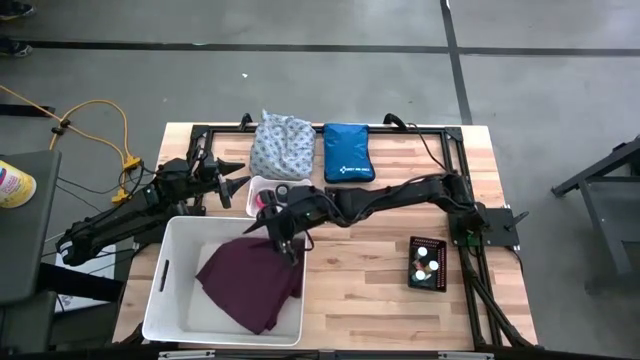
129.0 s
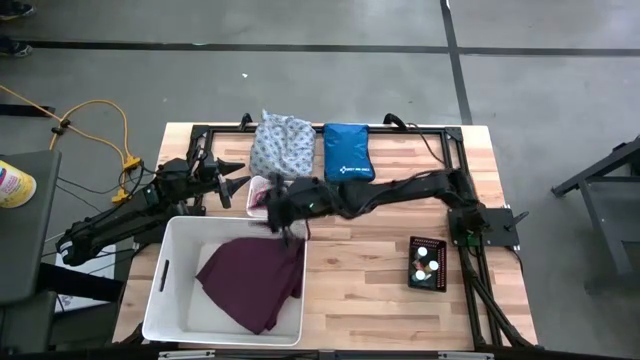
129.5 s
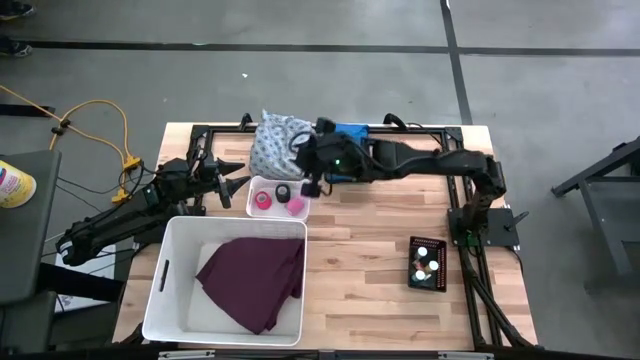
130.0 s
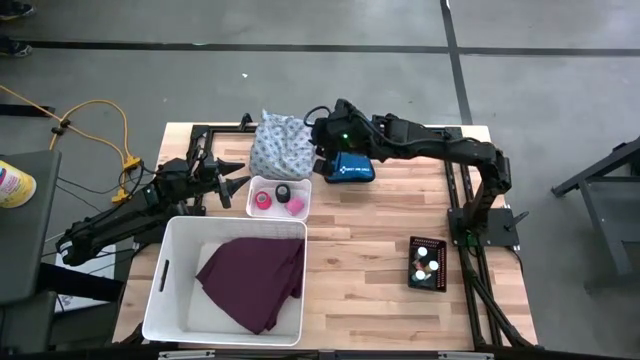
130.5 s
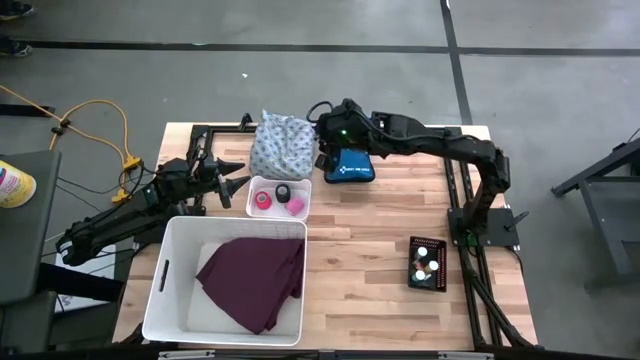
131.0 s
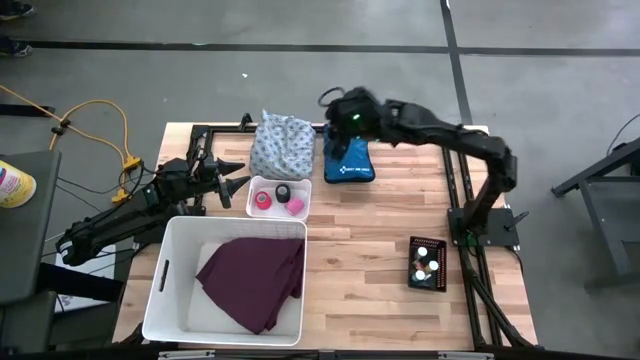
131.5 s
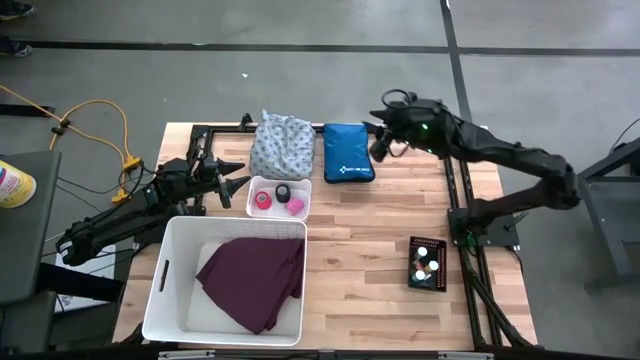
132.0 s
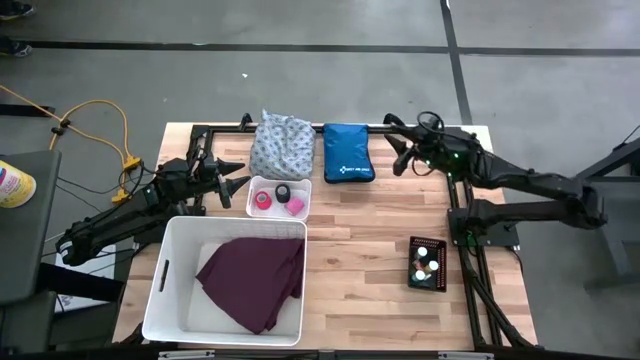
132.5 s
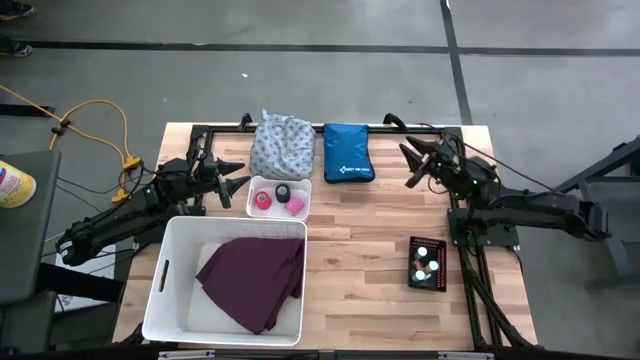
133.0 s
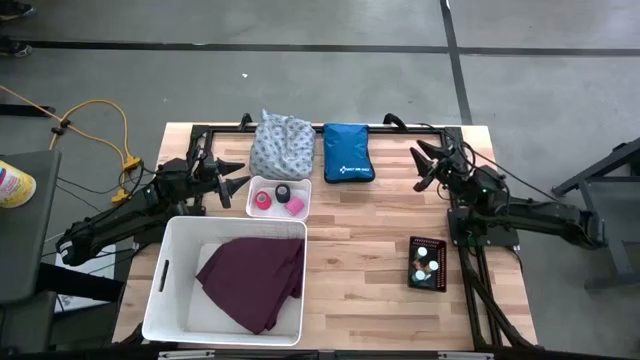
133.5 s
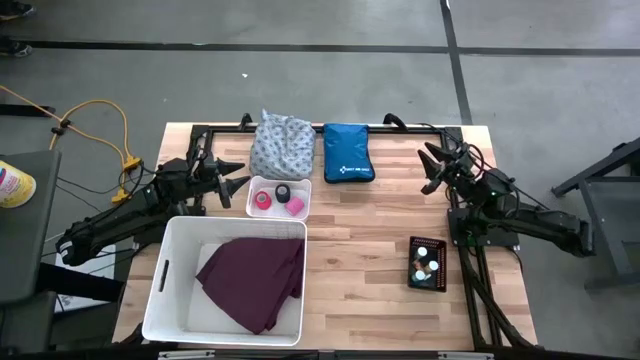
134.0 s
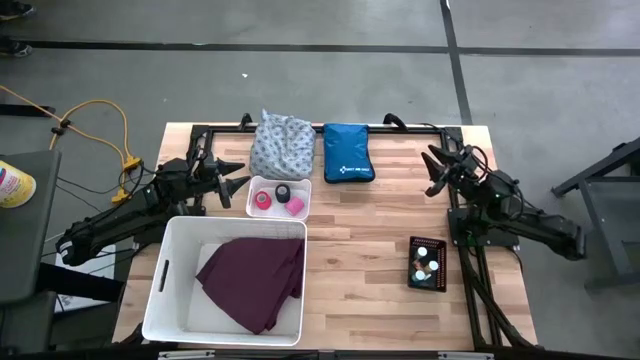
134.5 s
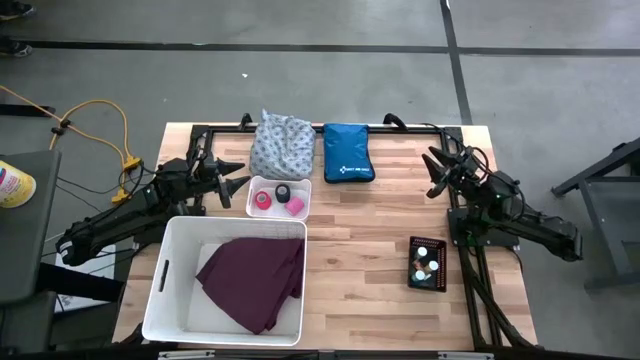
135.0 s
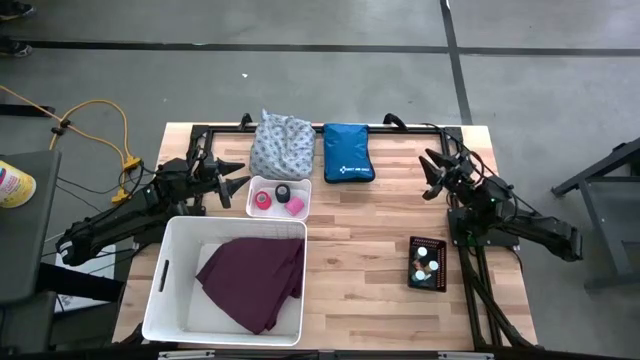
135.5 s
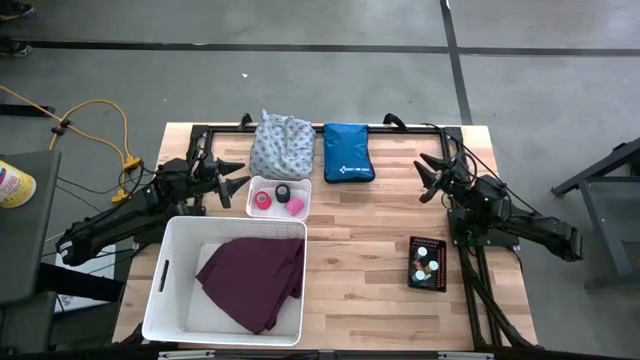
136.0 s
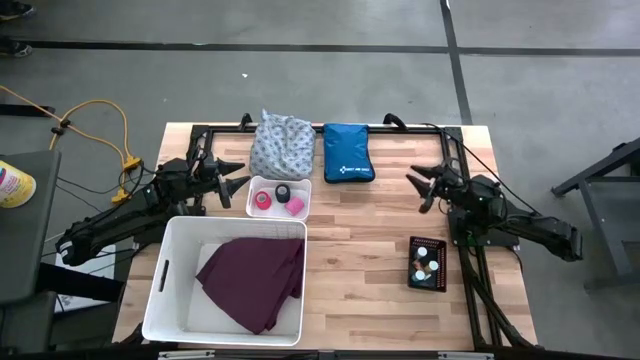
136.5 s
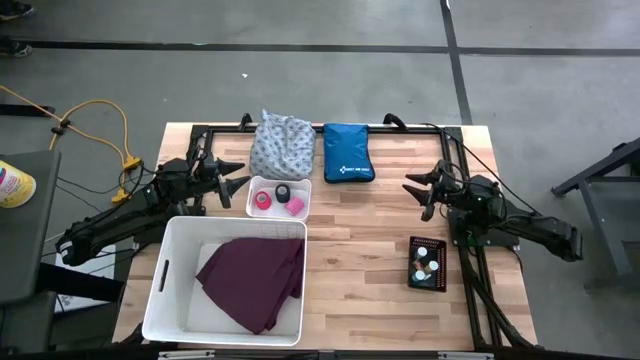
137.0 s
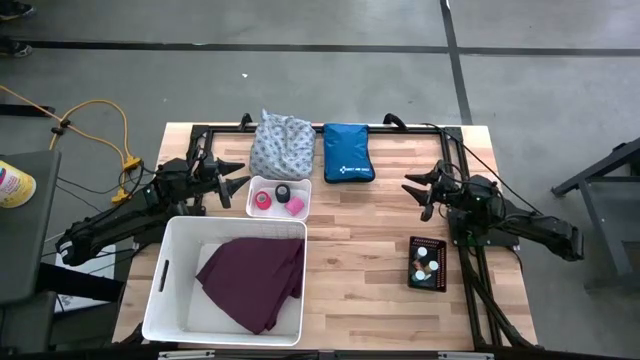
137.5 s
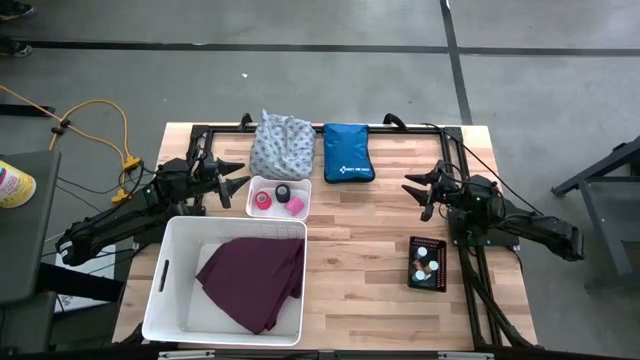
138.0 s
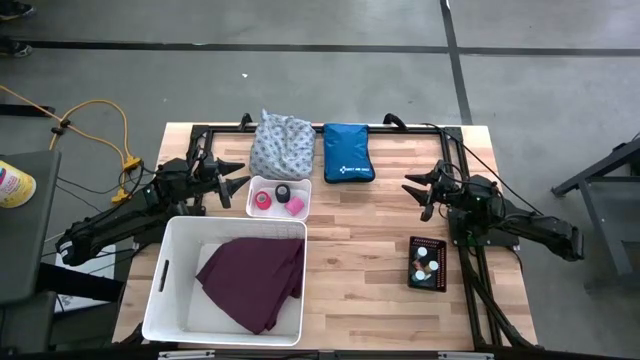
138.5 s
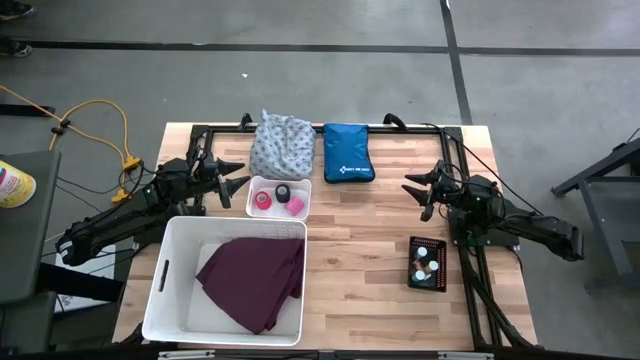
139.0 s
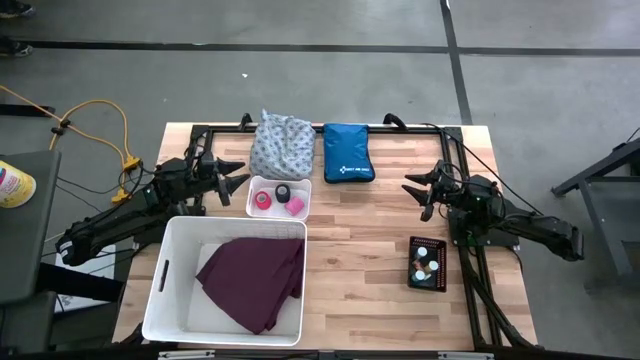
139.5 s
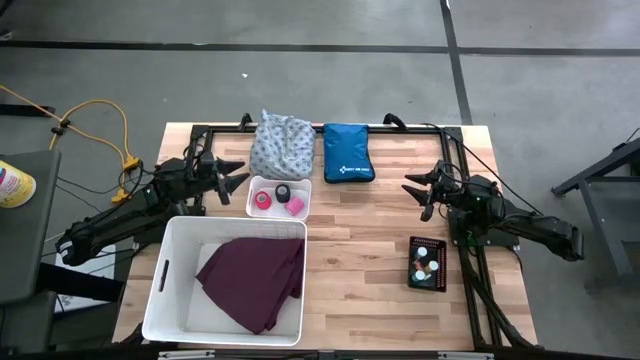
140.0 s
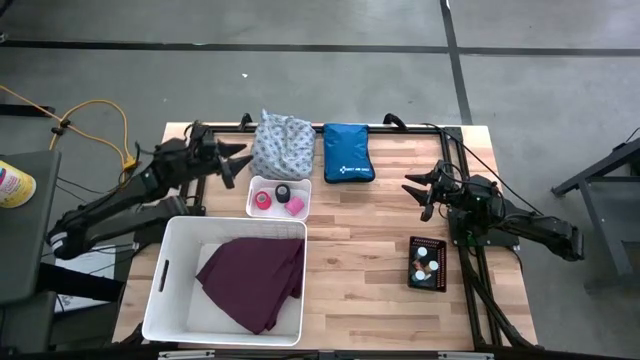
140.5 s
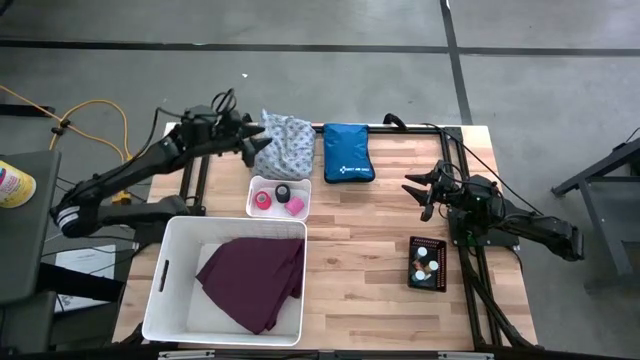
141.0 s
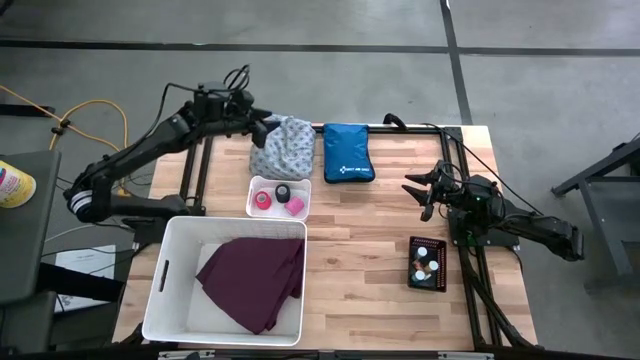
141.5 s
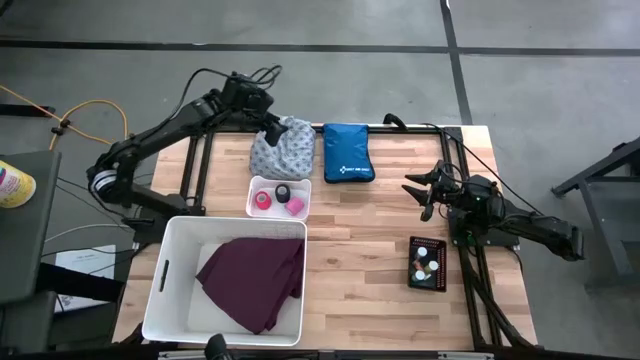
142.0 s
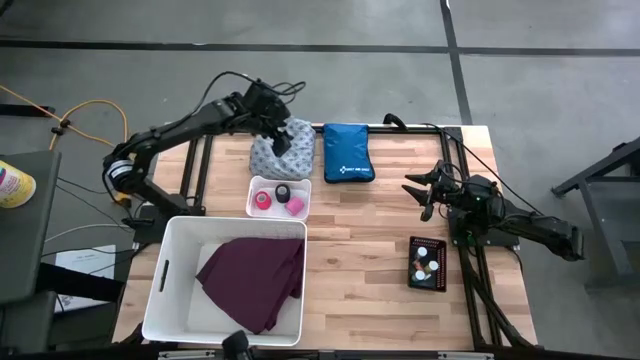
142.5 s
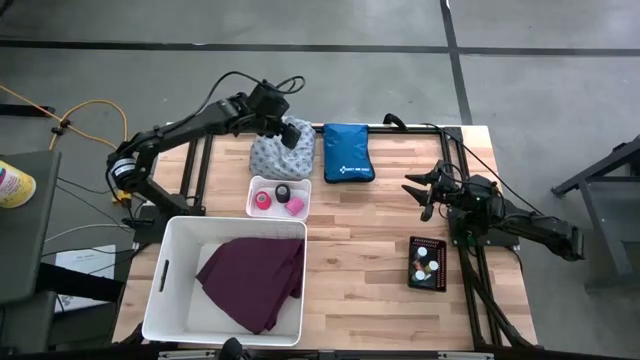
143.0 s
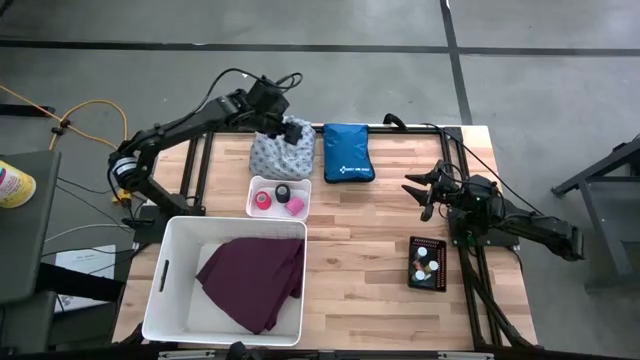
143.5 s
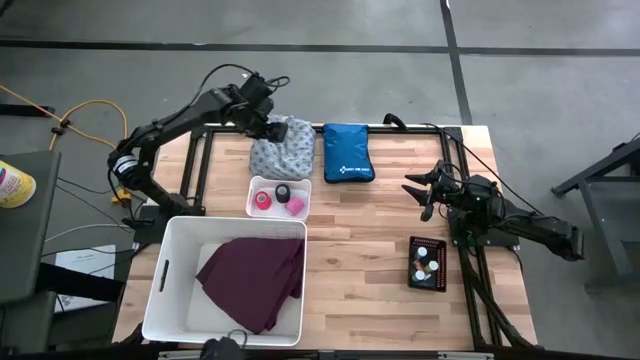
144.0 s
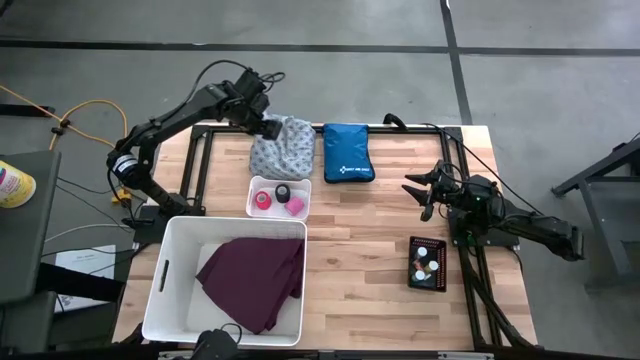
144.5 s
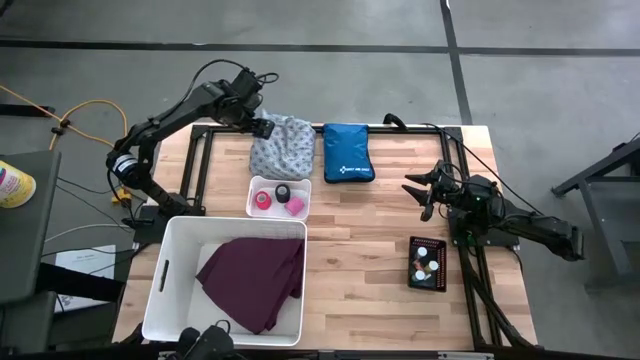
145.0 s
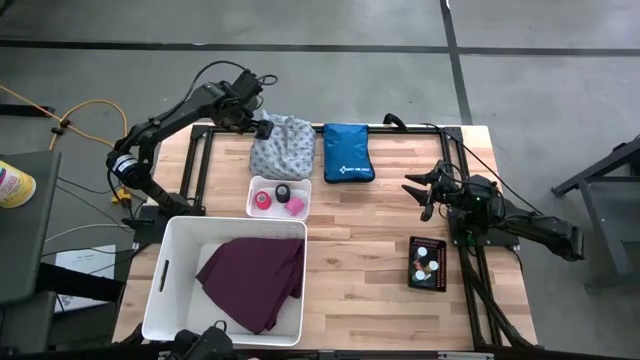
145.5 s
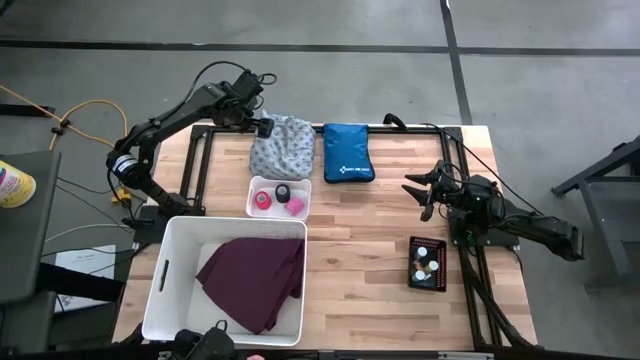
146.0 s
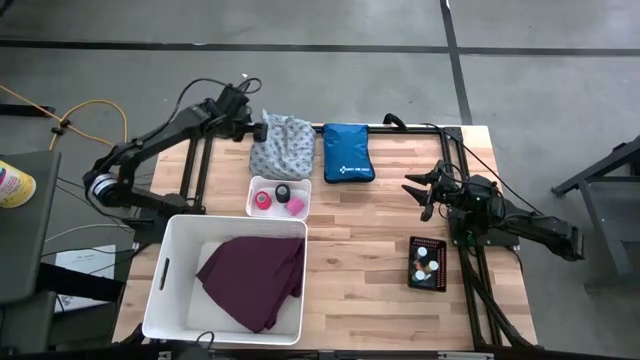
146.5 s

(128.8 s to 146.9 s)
Task: Pick & place medical supplies in basket/bin
Put the gray patient gown into the white laundry organizer

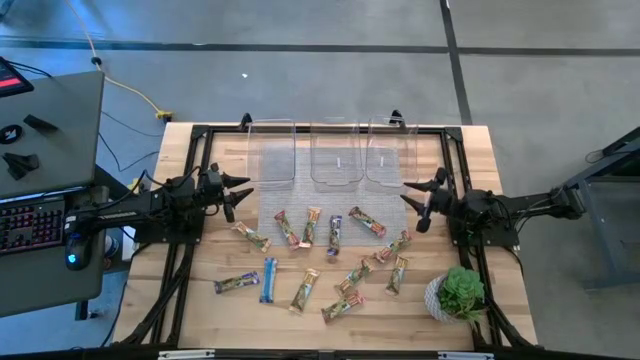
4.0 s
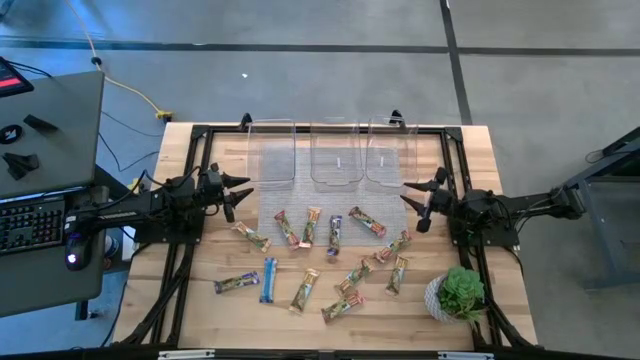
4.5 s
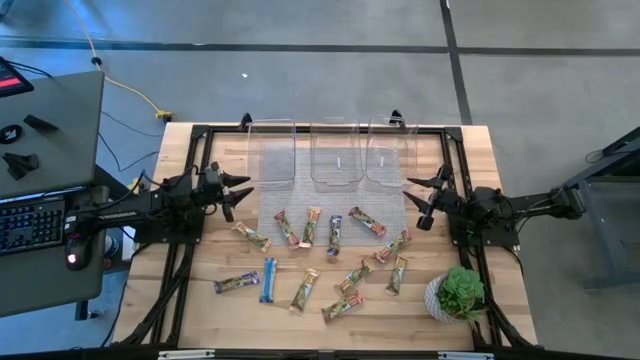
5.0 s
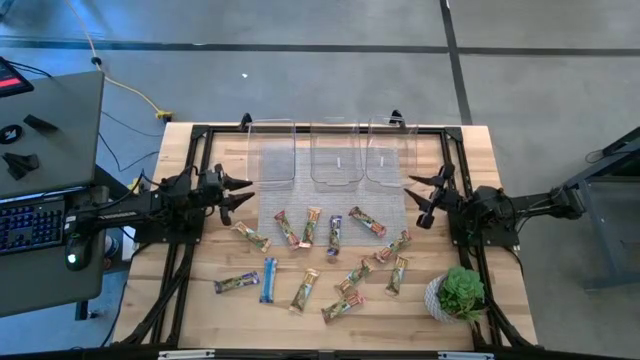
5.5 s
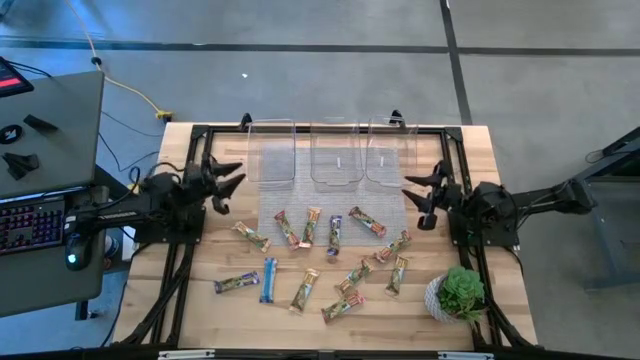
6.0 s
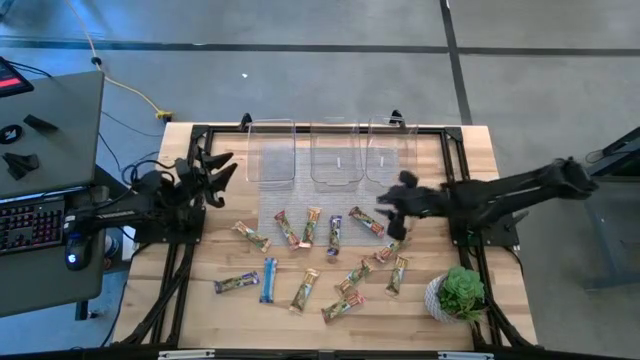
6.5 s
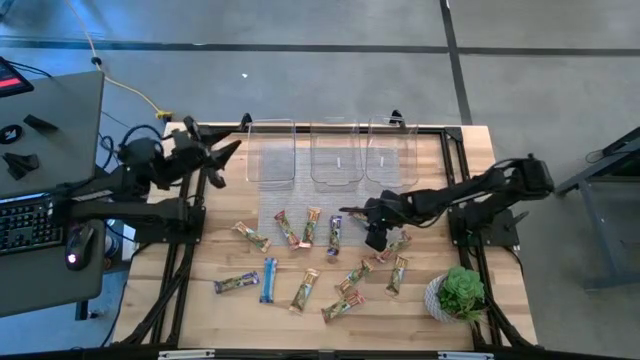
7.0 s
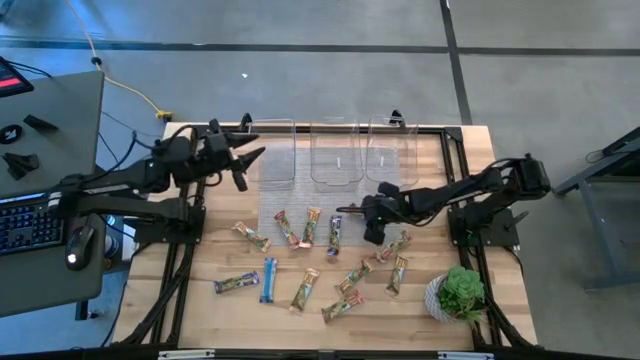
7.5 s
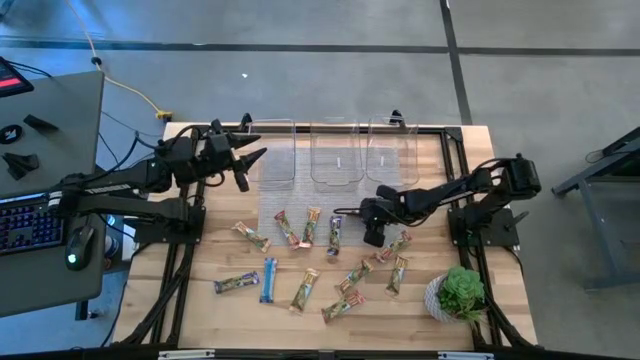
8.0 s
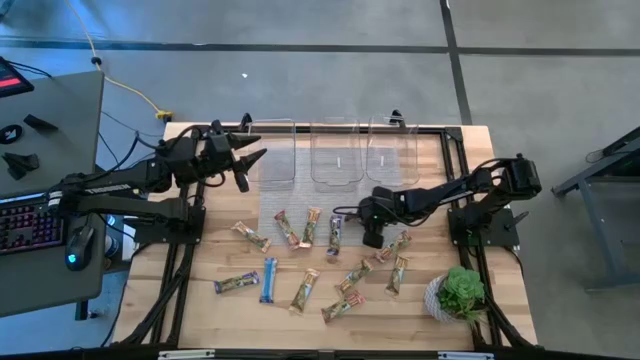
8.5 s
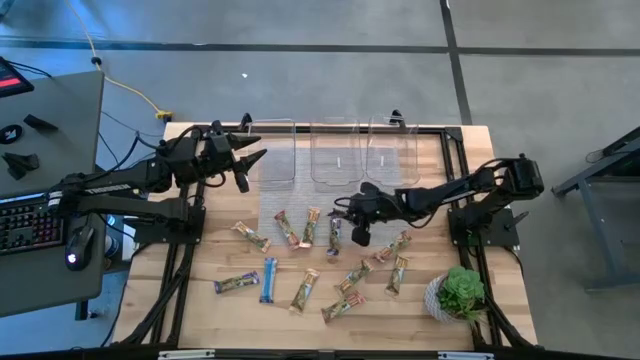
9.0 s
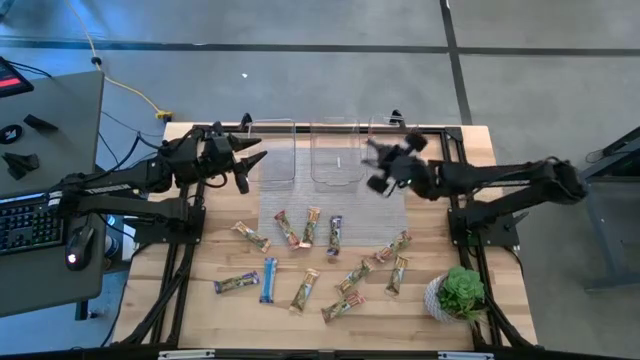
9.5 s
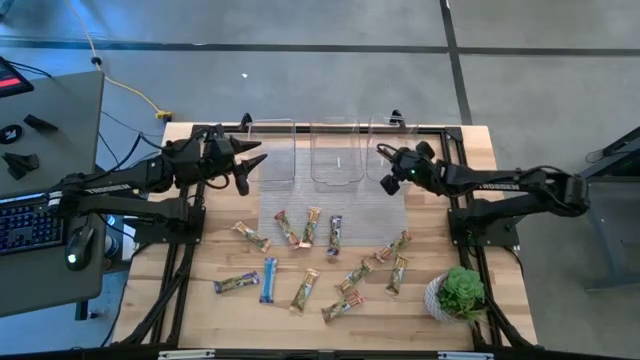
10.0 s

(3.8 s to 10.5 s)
Task: Pick and place Granola Bars by type
Put the red granola bar into the right transparent bin
